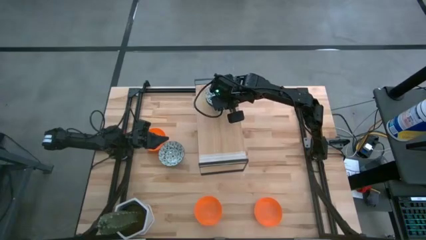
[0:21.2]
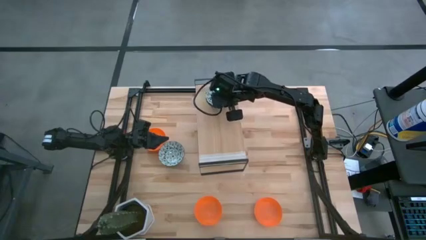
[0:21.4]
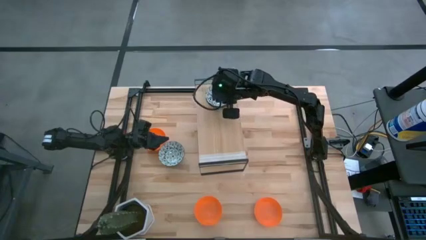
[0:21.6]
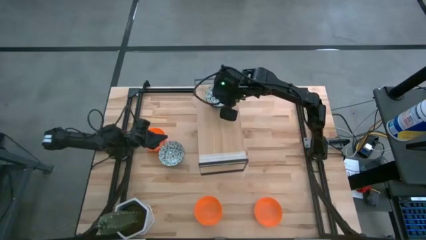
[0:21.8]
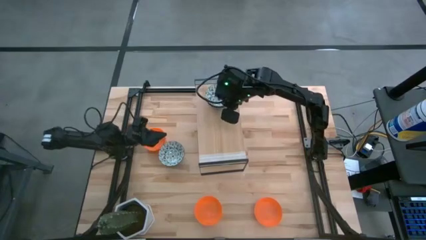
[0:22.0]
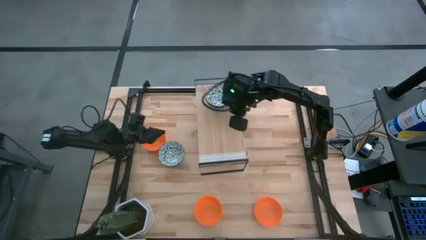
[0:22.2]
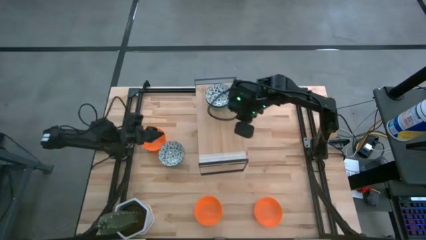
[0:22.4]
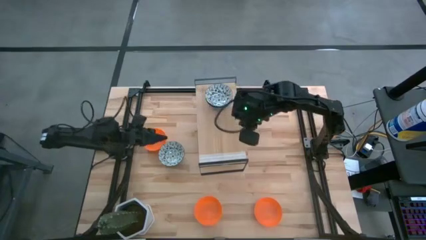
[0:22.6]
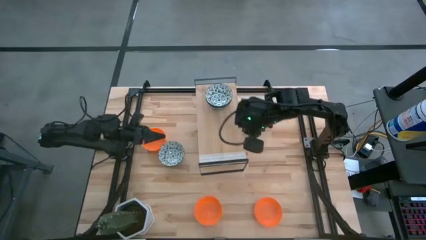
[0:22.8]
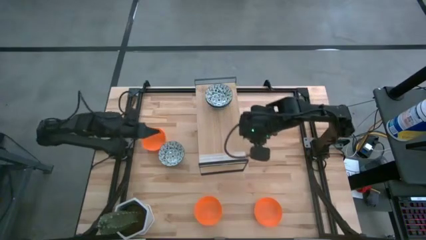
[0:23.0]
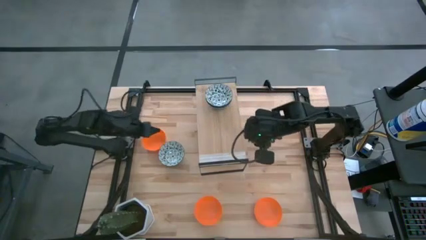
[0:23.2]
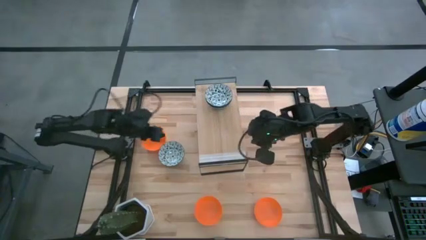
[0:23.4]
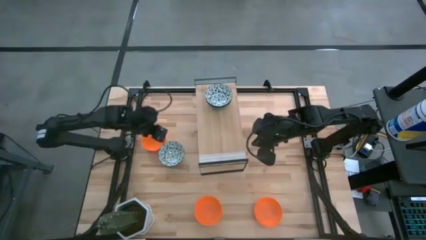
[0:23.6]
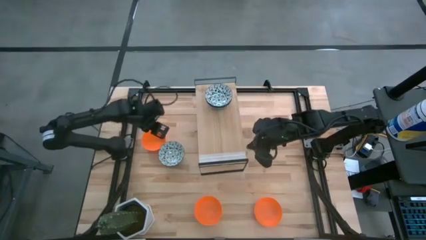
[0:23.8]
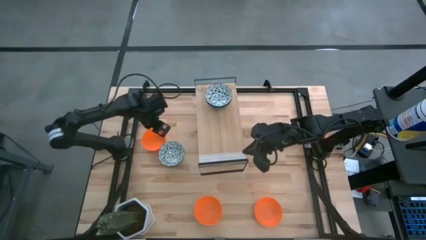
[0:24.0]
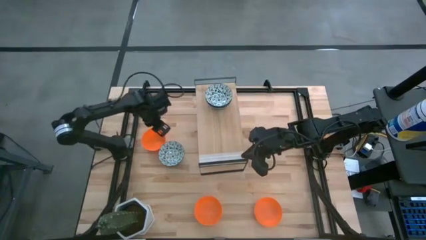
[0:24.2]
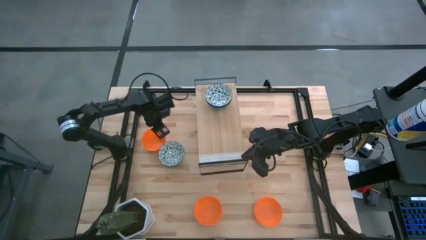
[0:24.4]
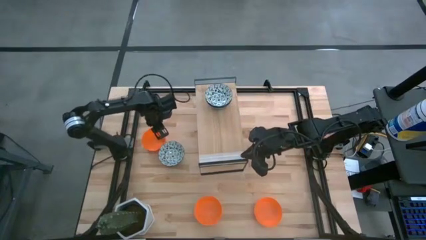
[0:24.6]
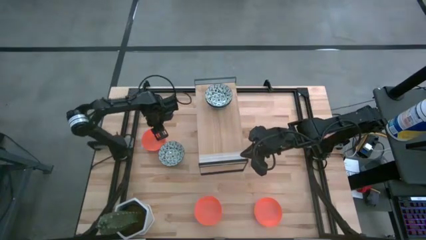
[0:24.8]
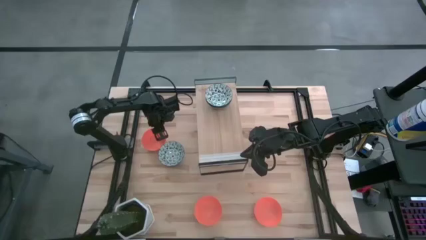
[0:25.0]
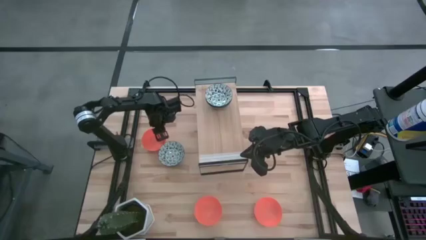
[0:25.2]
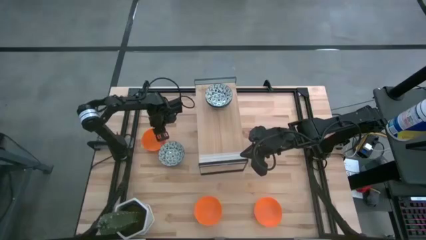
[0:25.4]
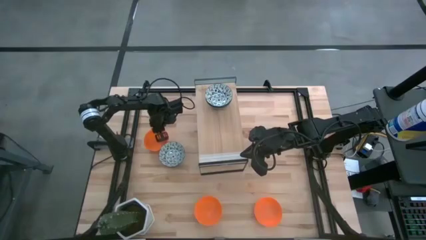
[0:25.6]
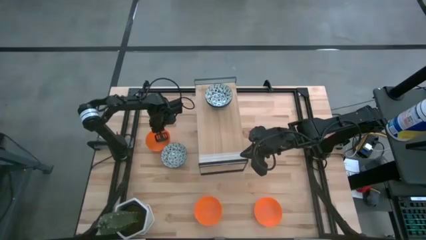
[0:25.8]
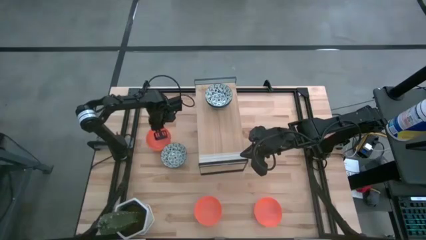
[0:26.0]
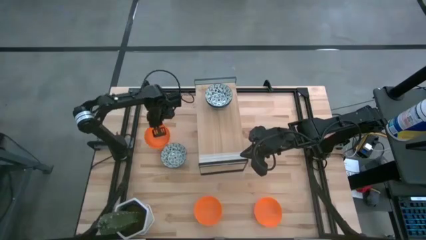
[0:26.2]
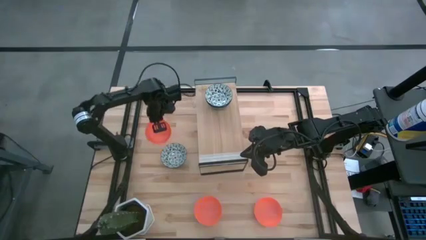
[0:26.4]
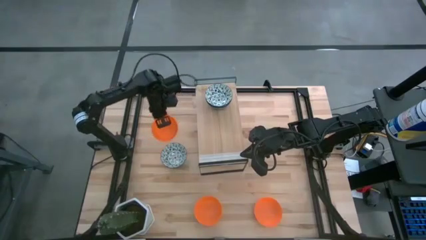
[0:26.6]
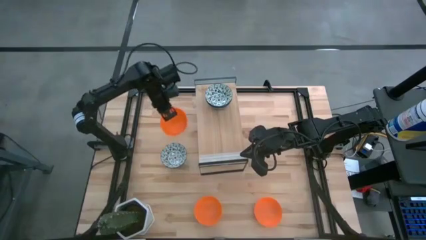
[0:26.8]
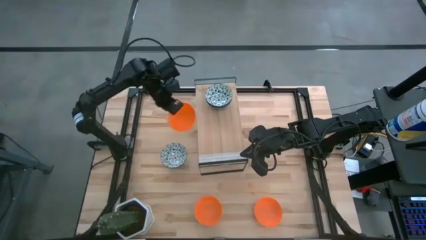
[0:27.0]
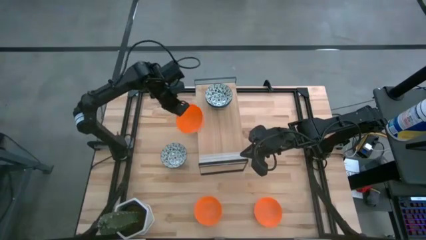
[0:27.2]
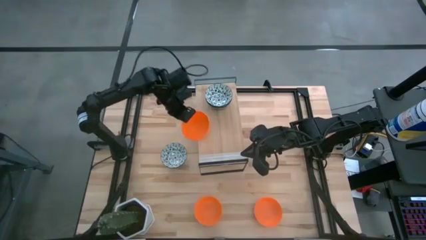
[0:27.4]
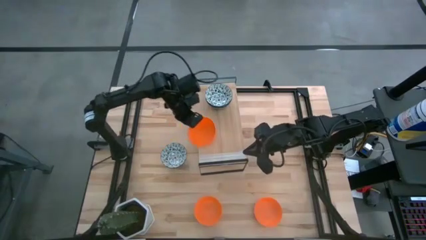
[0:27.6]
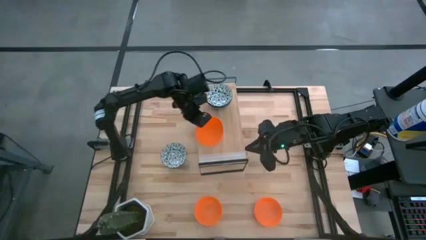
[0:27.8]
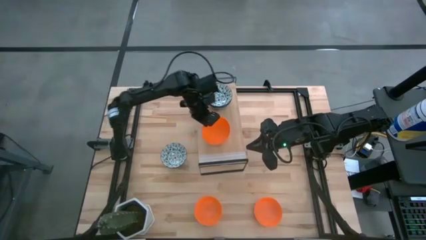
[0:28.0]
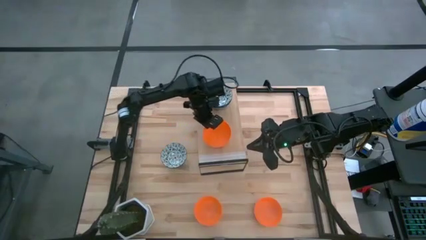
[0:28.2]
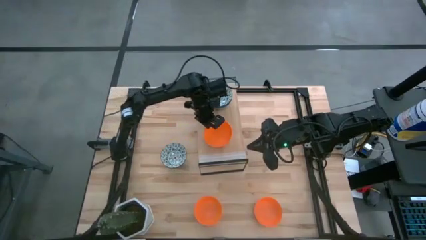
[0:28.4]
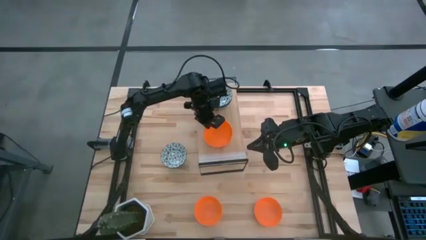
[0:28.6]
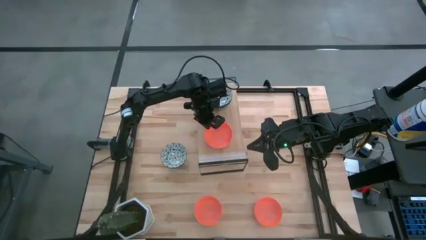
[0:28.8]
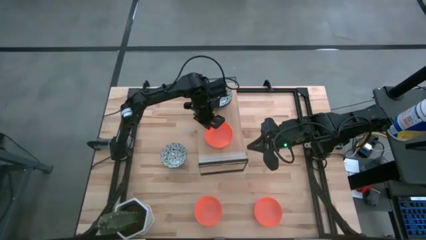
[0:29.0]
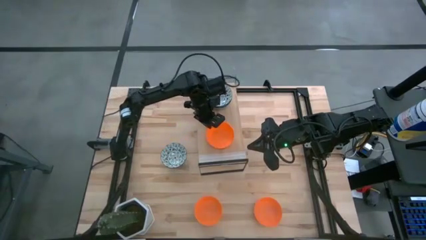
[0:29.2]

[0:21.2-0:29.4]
Task: Pick & Place Mini bowls
Put the top orange bowl on the shelf

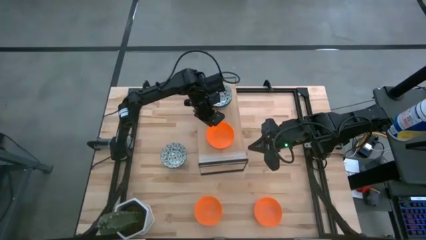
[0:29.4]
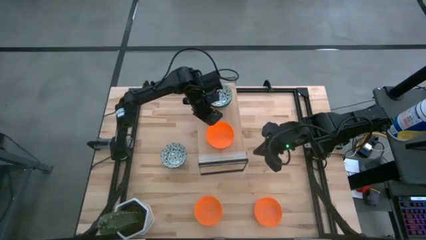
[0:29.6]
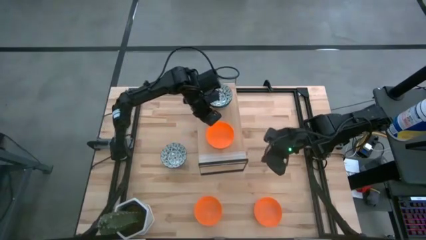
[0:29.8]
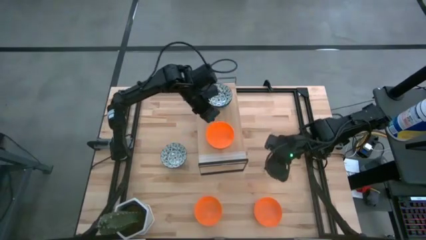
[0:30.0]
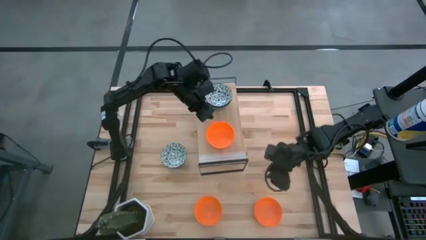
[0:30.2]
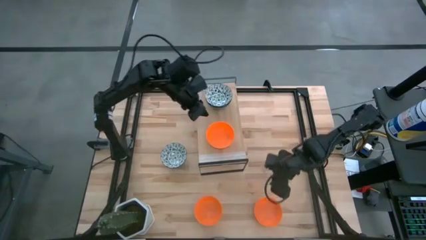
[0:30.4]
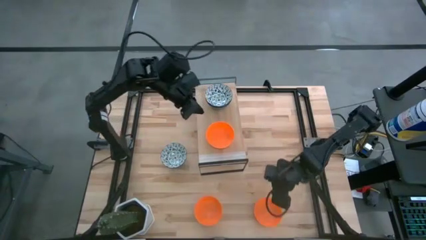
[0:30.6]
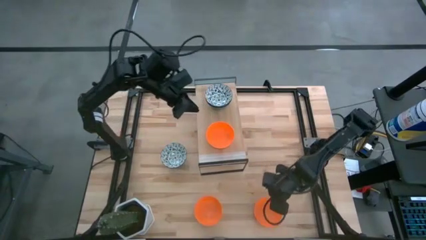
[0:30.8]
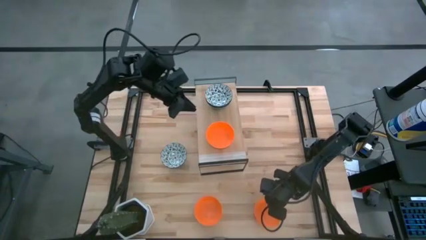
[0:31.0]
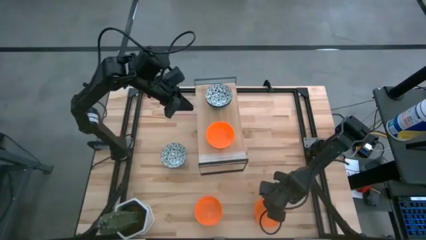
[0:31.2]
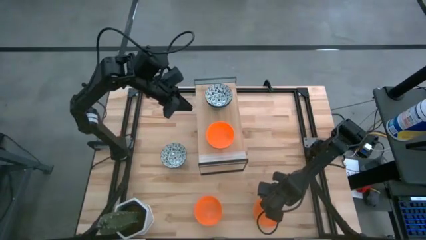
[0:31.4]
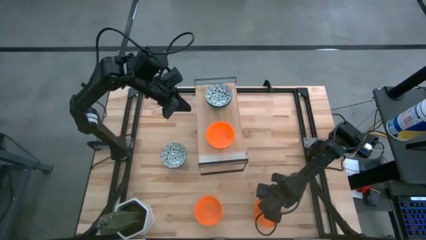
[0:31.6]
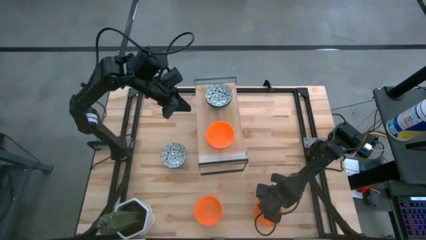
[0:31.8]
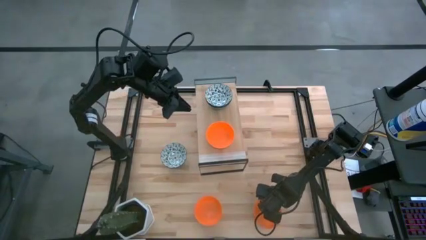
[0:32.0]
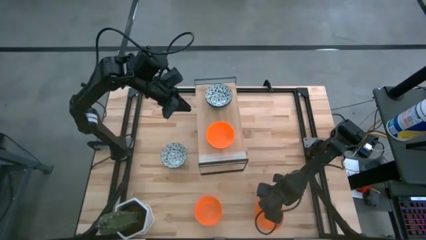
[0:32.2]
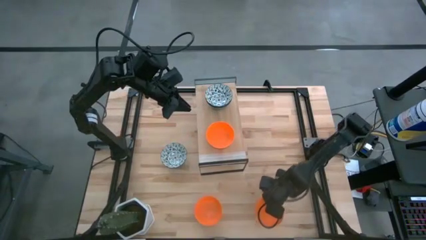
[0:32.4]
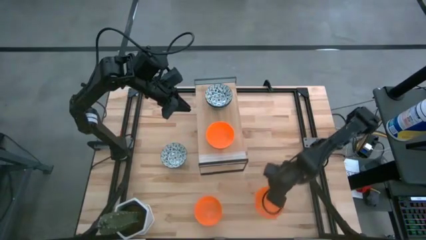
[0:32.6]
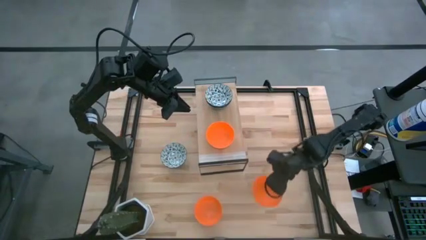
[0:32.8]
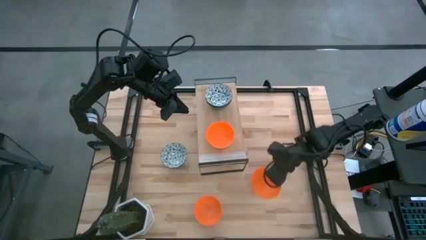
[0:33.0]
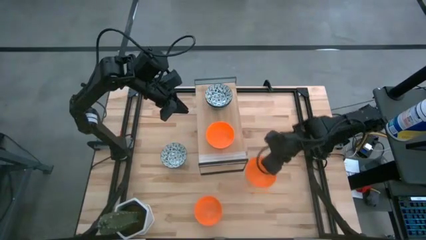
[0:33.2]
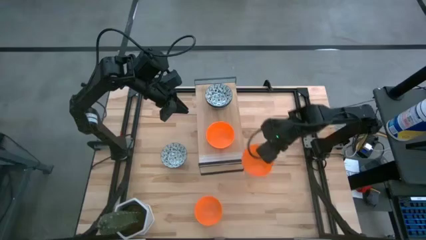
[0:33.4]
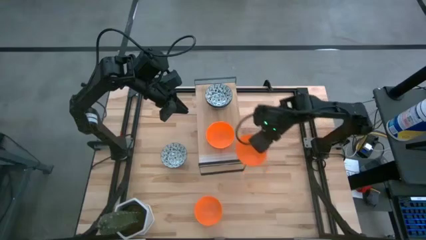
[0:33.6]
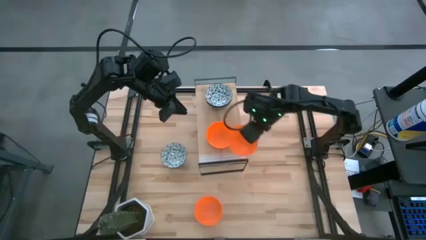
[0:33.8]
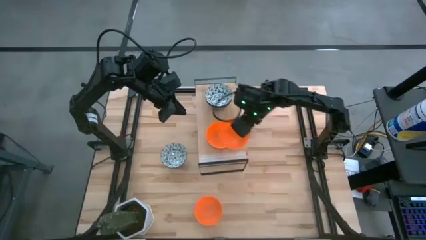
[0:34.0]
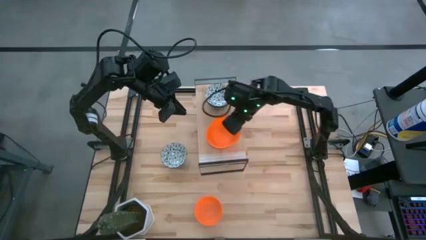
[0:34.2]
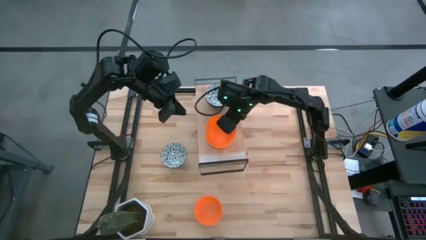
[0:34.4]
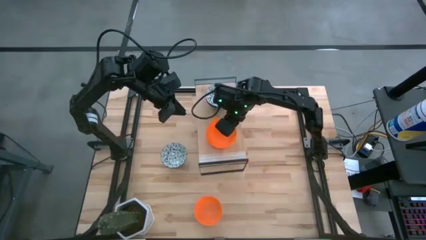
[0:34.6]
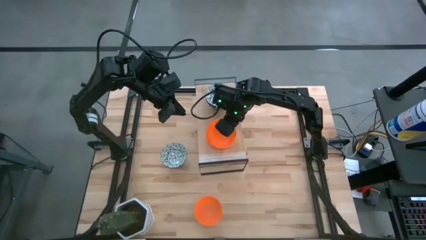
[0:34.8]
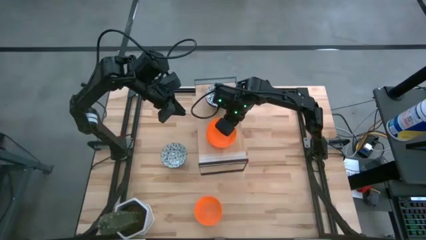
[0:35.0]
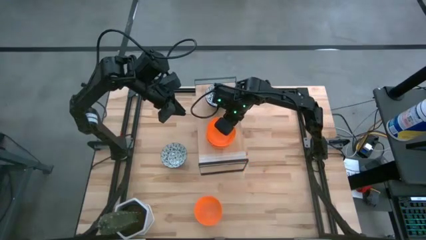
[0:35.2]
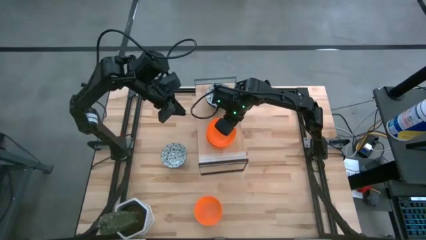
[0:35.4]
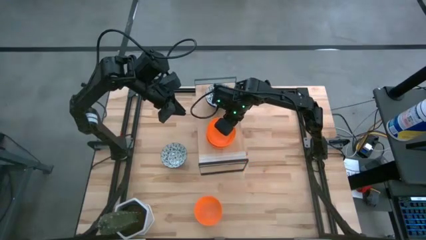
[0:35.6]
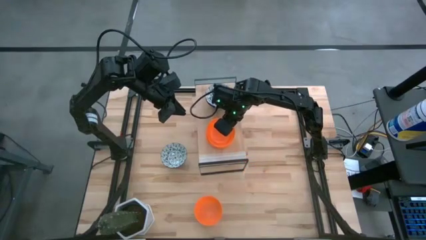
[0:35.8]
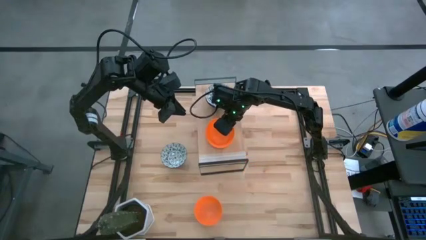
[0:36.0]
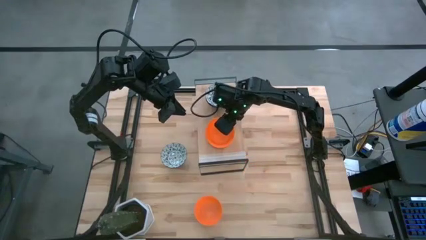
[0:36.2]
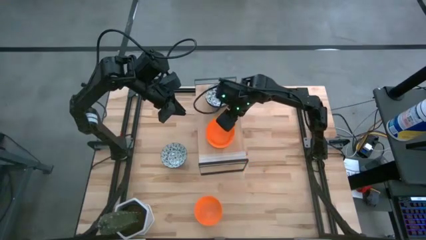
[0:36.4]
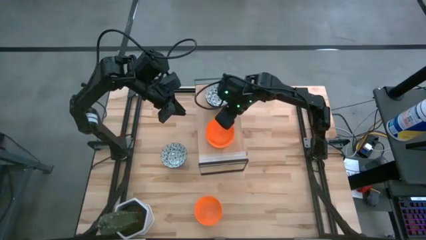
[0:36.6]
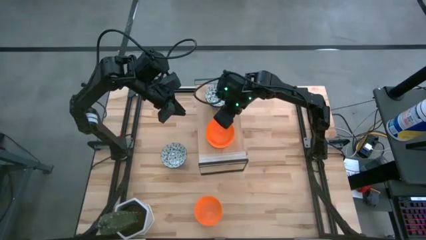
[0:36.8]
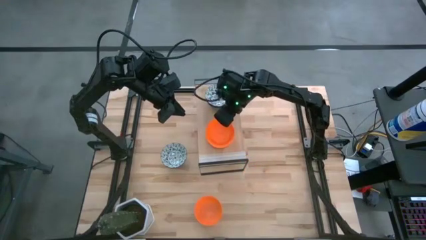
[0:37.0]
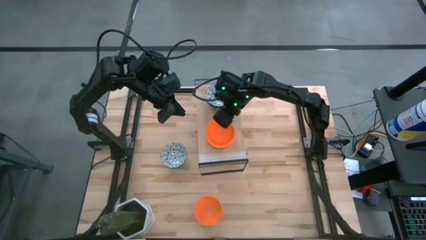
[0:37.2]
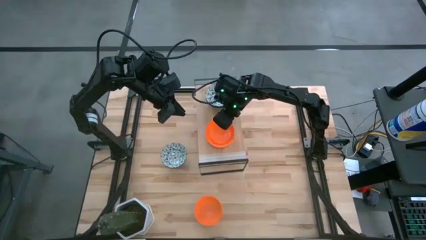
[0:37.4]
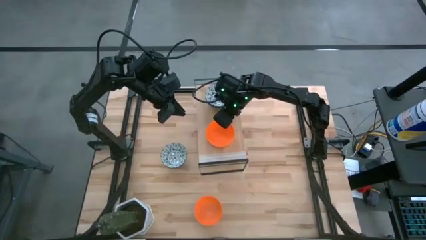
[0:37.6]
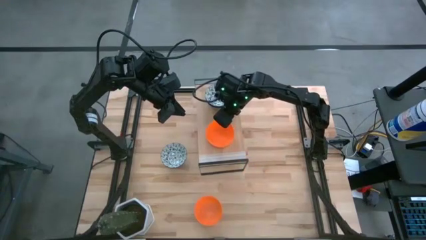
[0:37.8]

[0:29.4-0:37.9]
Stack the right orange bowl on top of the orange bowl on the shelf
